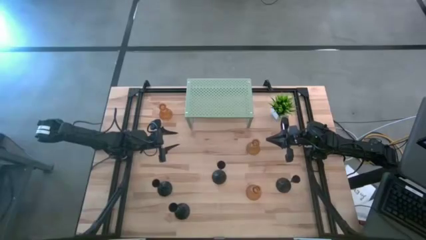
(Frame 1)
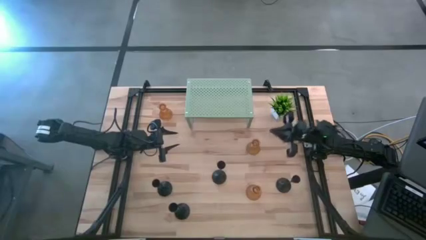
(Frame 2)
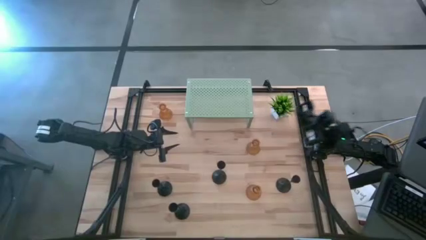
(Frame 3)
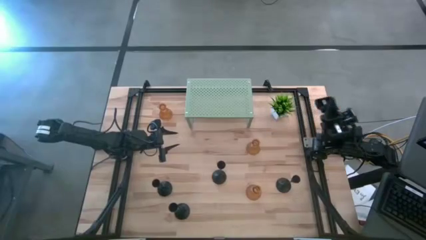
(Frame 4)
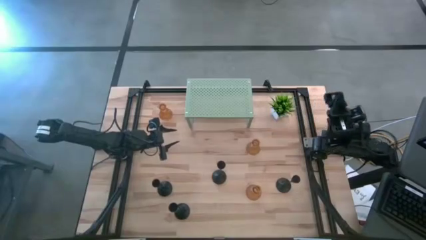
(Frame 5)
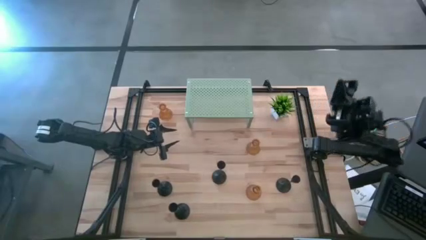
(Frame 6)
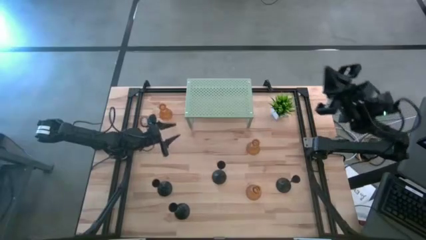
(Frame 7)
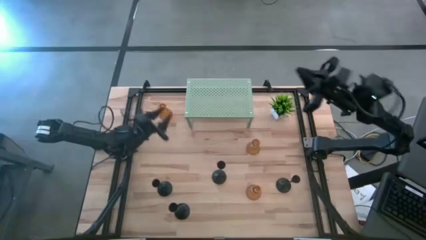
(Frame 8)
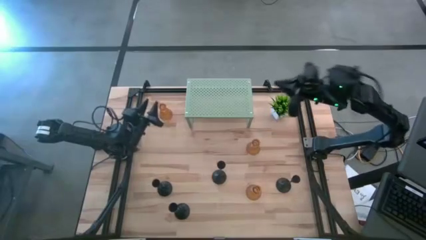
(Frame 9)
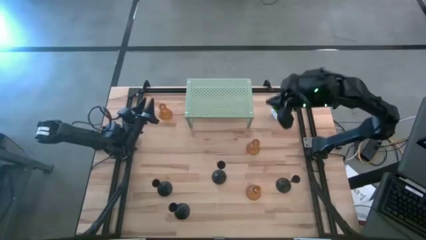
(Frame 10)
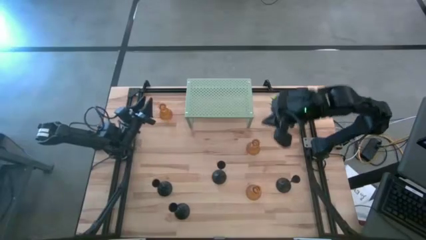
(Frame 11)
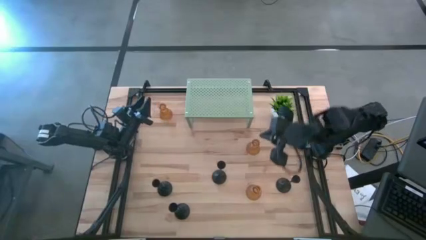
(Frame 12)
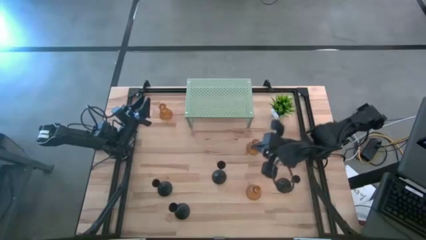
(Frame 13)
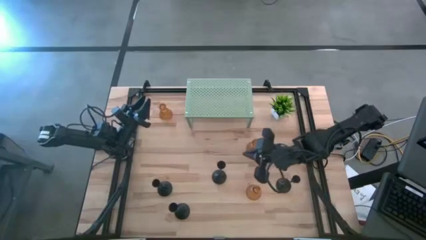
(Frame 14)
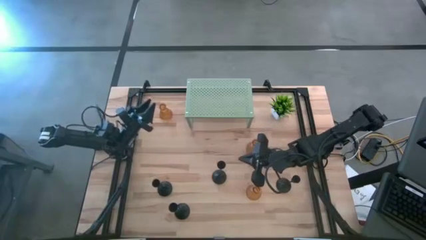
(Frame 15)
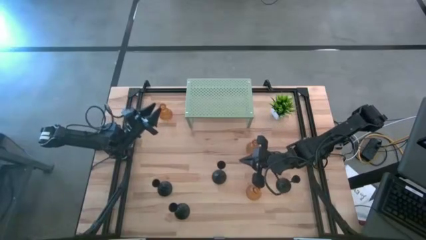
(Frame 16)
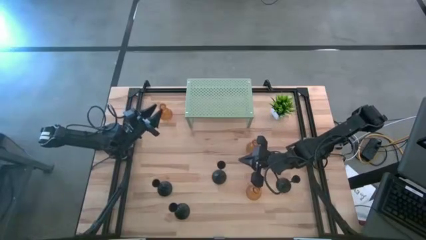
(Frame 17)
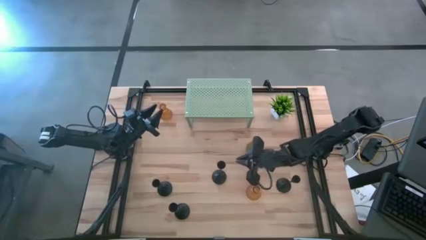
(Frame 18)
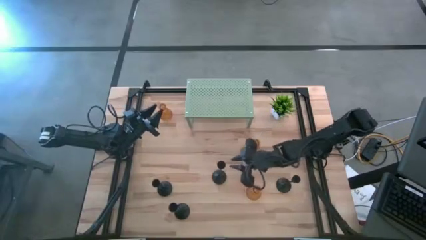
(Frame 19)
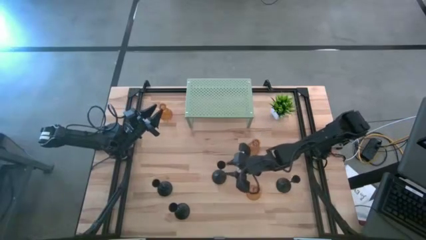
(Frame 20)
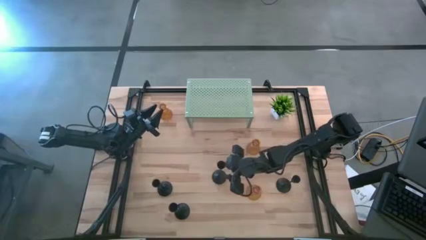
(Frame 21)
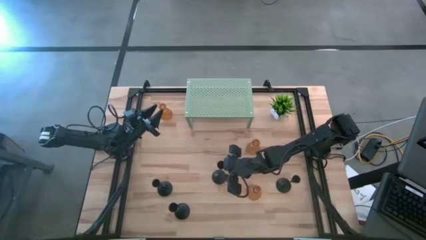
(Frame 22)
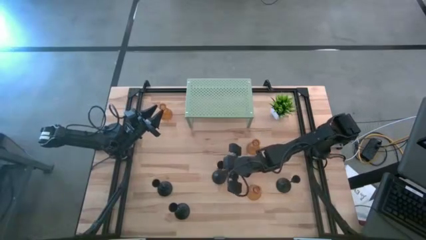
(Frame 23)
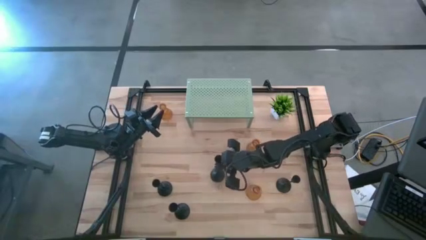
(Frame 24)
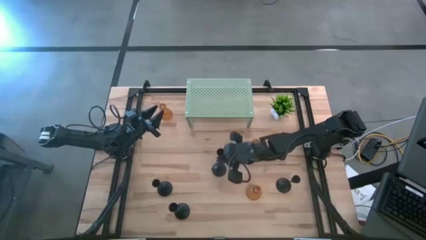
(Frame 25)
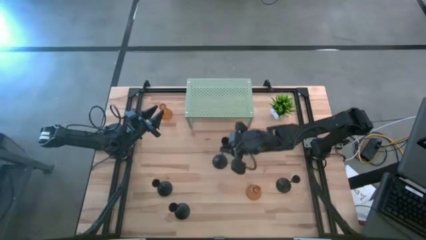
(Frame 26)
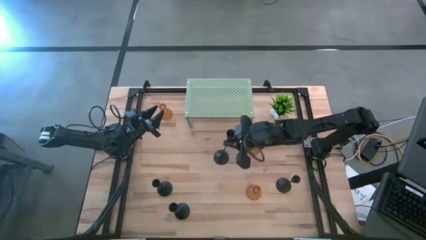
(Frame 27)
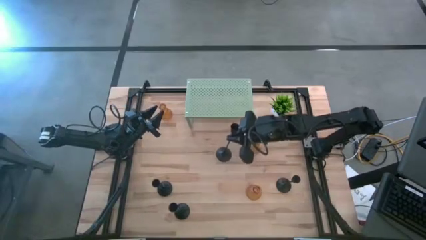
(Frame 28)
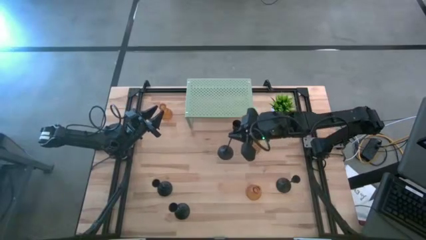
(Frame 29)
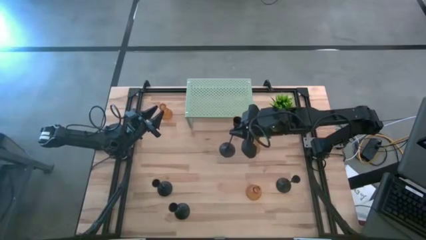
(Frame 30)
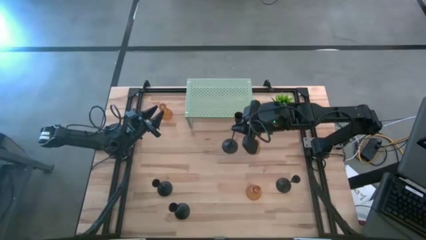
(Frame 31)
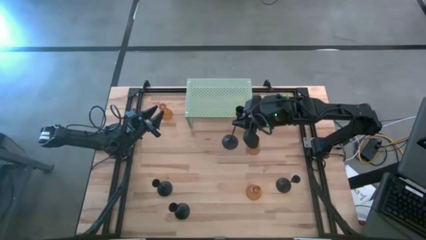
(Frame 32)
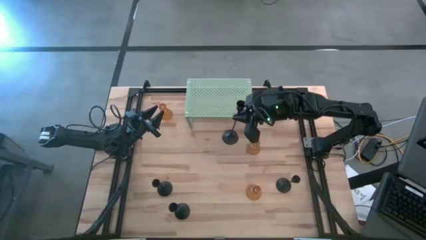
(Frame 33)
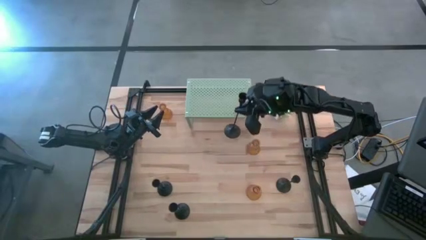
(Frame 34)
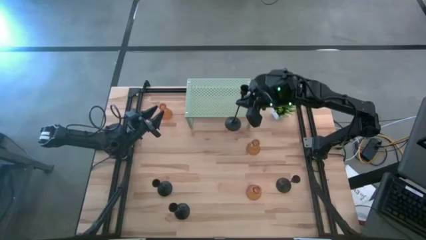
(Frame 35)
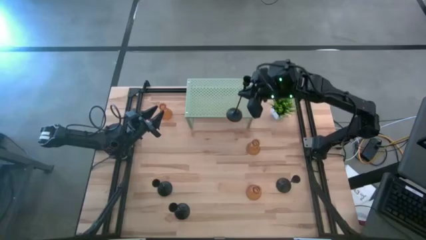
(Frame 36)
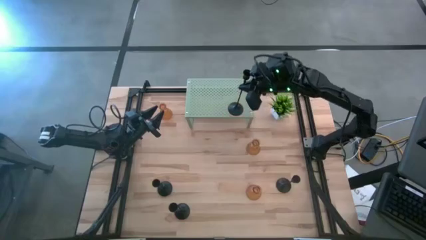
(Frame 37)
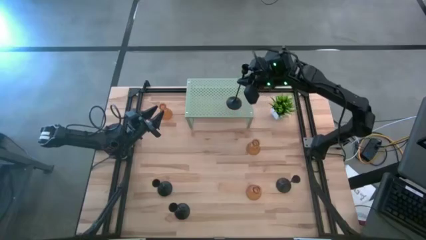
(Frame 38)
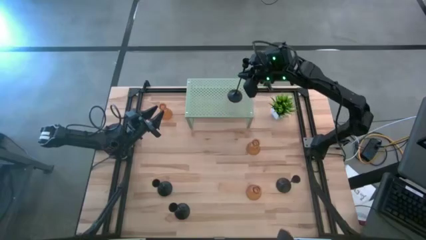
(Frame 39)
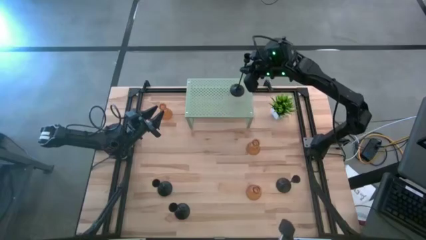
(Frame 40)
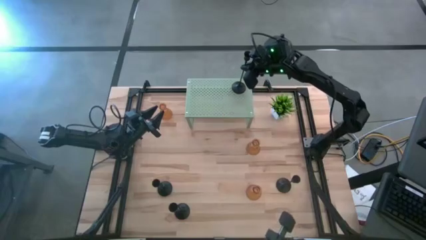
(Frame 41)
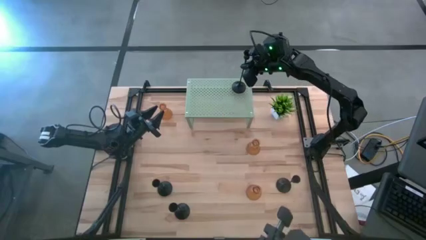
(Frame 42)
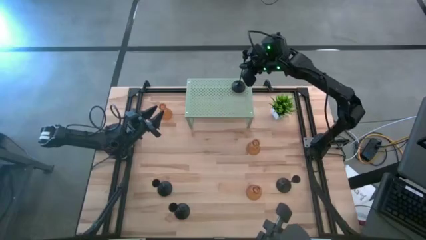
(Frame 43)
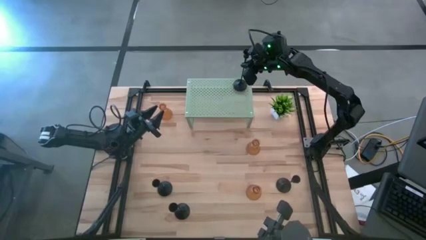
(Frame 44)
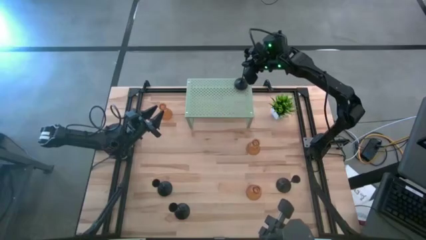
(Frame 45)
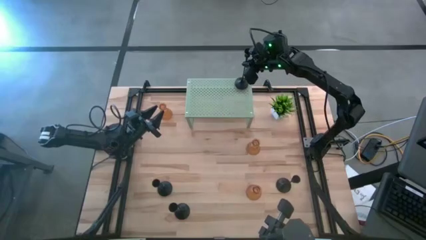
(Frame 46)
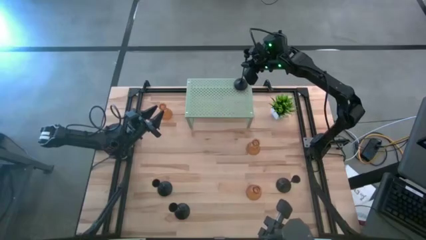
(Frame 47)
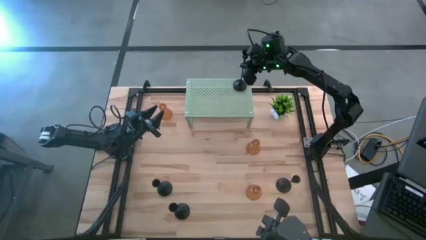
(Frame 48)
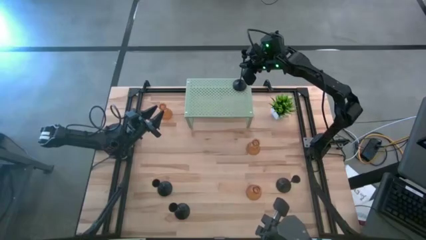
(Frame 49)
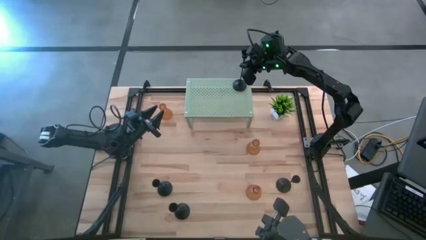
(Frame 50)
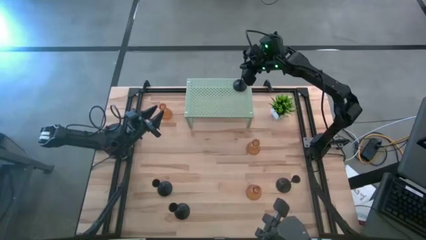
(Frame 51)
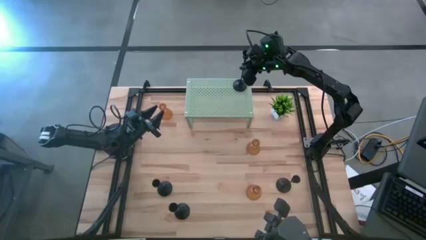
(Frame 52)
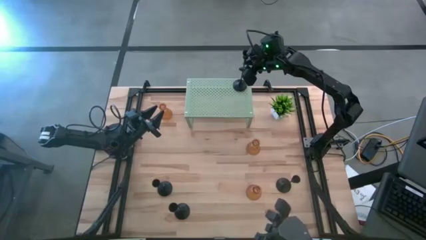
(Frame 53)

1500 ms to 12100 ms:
Task: Pick & Place candle stick holders
Put the middle black candle holder on the shelf

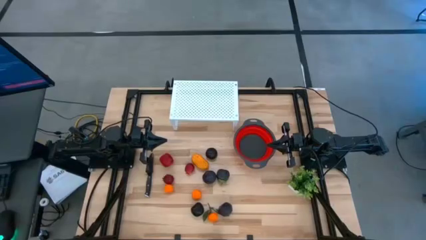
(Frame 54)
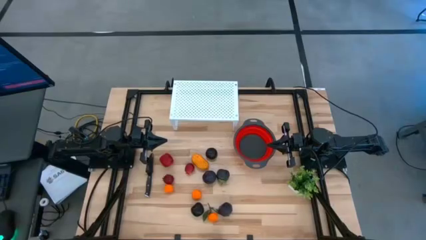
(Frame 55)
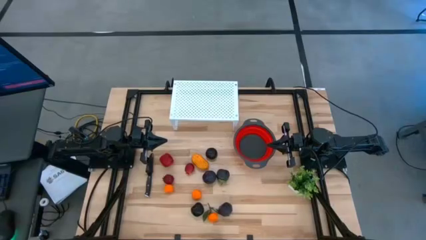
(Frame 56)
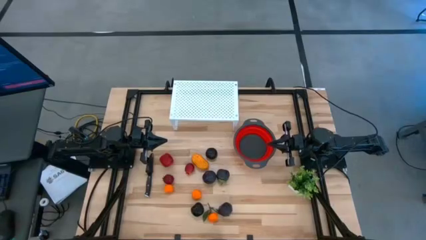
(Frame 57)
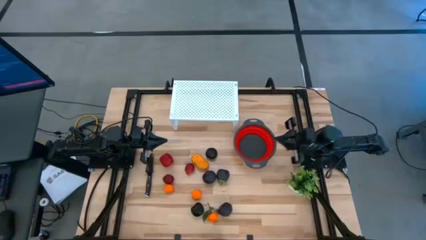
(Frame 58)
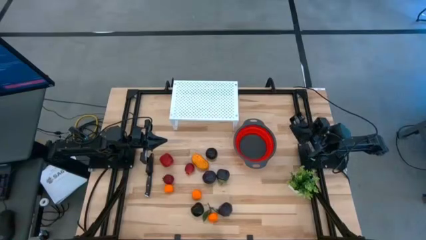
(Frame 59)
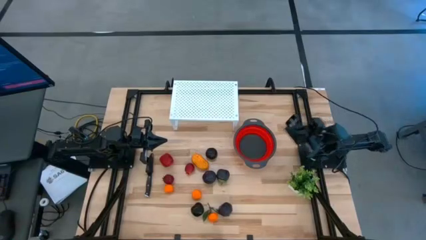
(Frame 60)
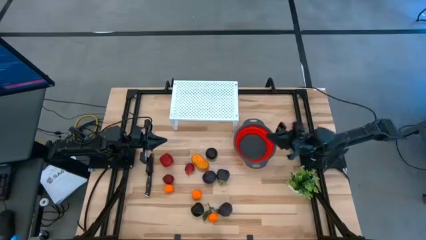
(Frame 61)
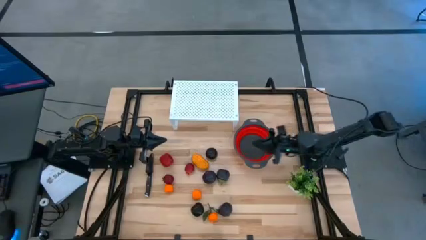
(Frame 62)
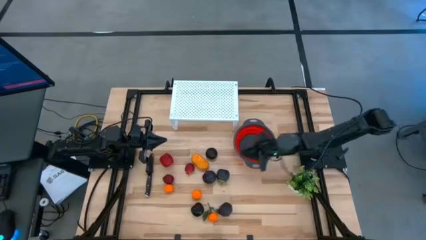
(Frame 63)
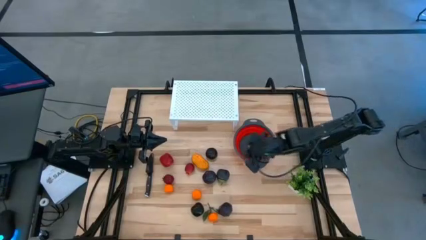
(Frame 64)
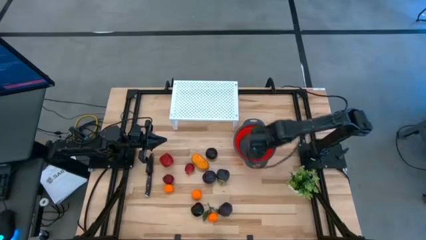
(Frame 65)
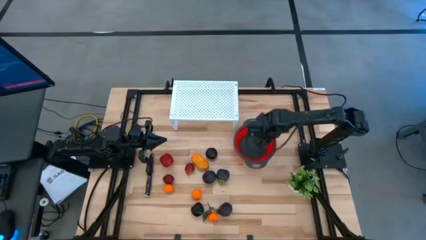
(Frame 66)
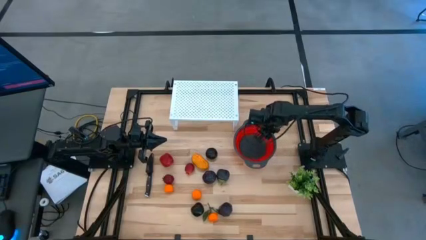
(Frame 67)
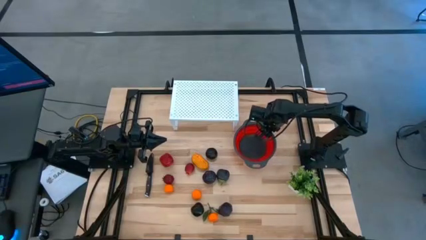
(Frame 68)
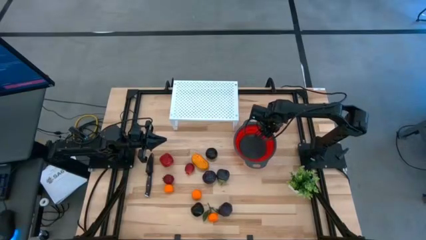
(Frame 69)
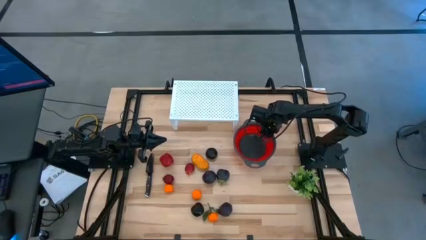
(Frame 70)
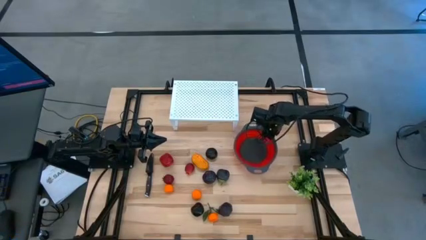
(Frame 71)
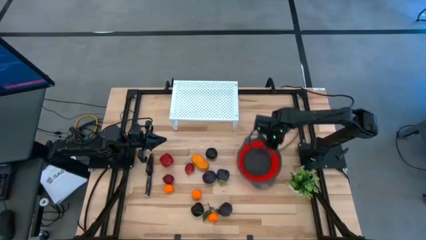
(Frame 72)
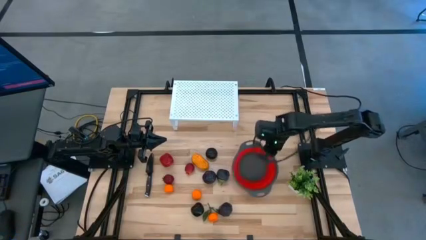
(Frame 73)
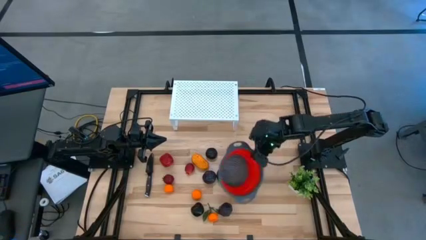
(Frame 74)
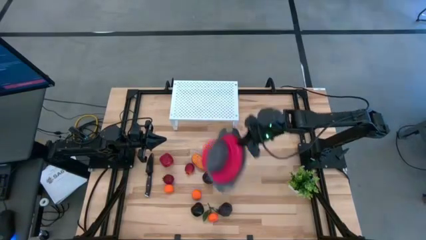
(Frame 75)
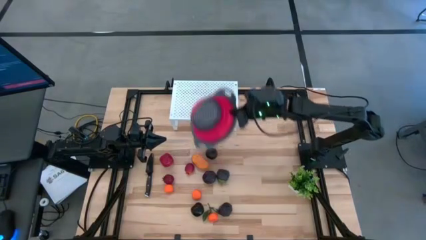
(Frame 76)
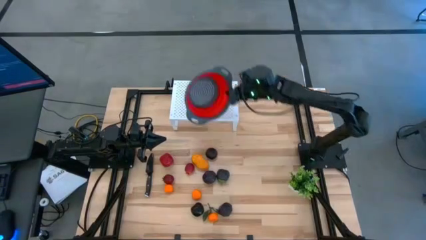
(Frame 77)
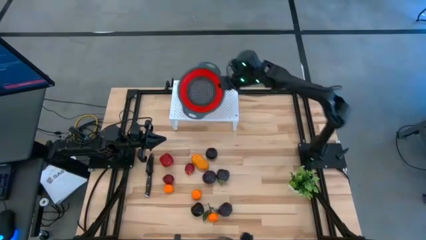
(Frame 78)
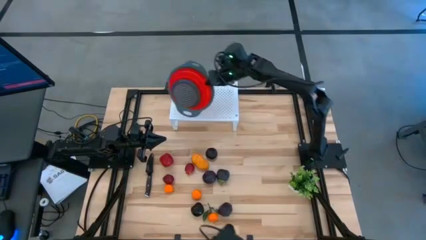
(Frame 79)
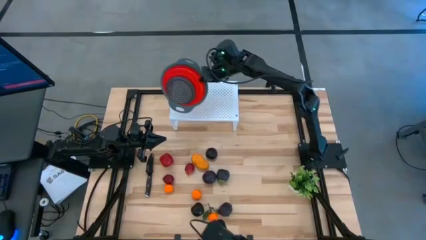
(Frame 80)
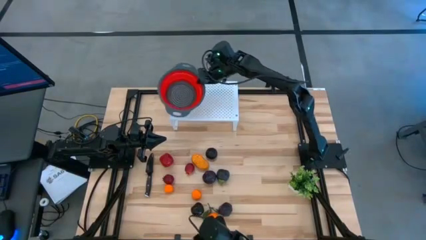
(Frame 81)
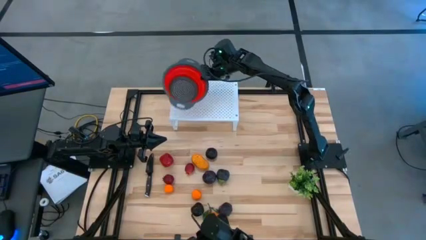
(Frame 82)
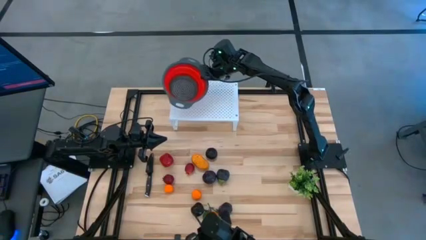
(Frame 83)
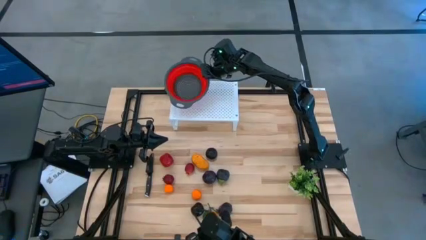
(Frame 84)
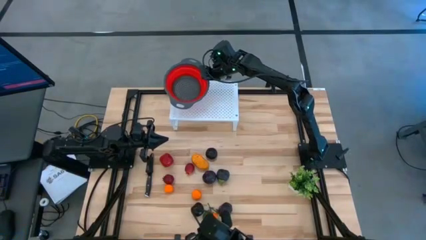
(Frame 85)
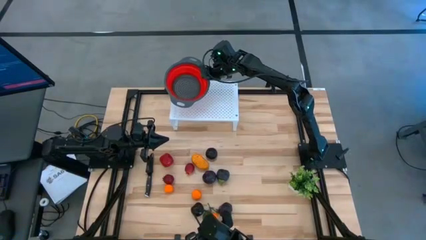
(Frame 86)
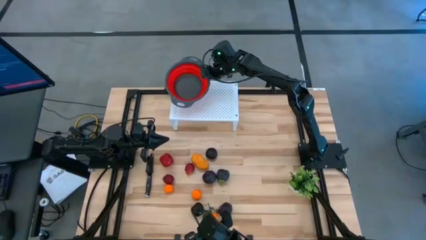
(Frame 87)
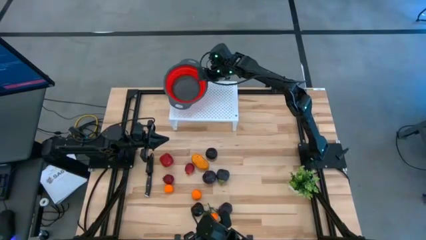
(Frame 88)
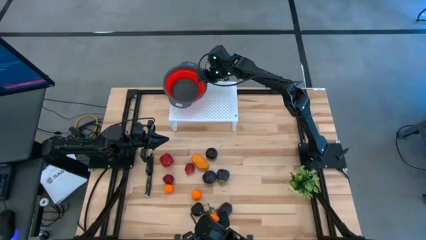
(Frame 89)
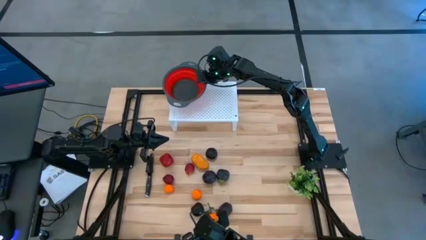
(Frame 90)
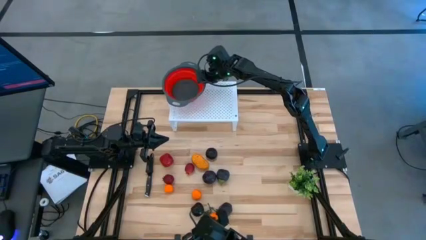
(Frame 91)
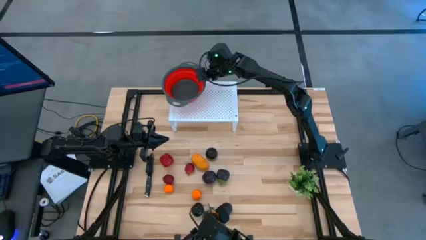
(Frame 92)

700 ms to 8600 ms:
Task: Pick & Place Fruit
Put the red strainer bowl on the shelf
